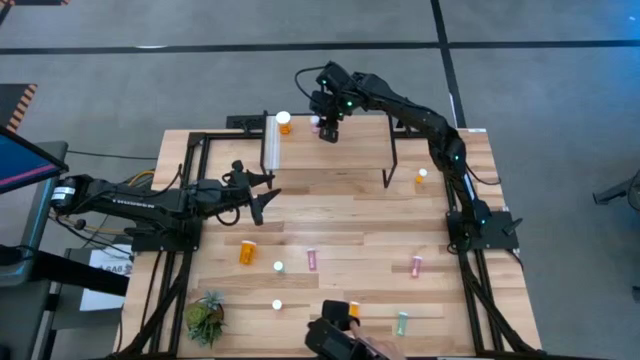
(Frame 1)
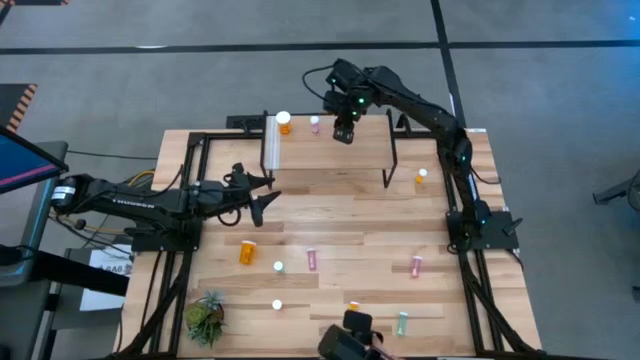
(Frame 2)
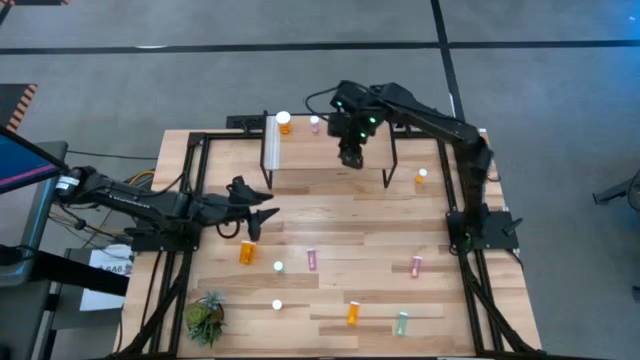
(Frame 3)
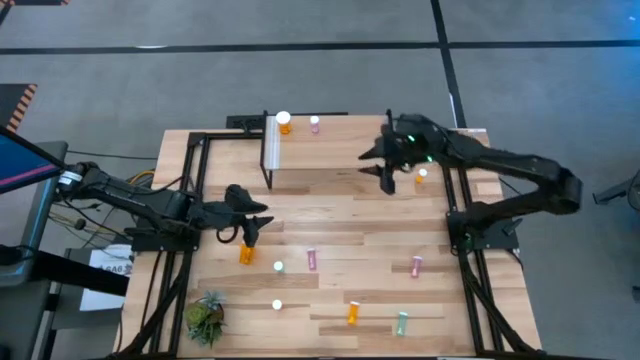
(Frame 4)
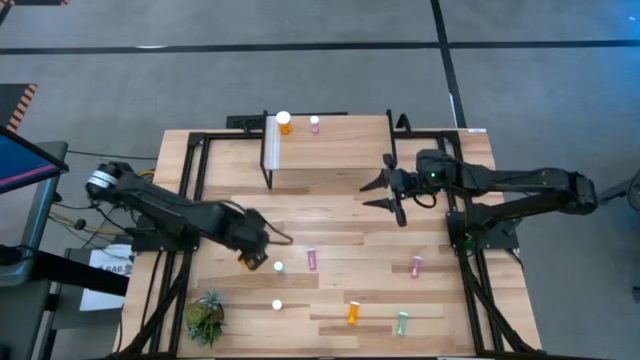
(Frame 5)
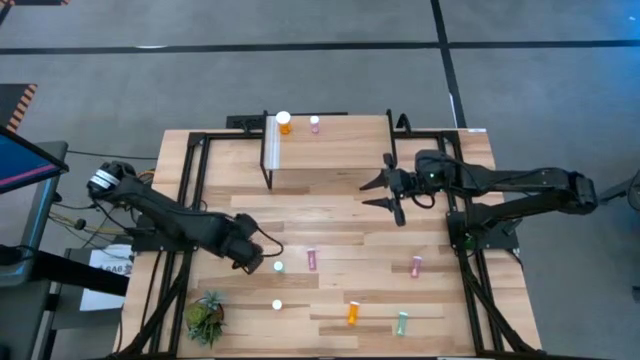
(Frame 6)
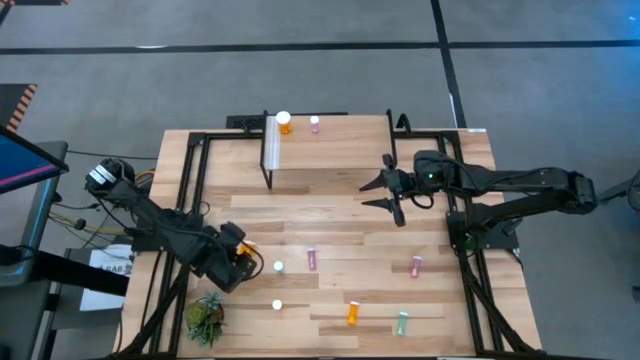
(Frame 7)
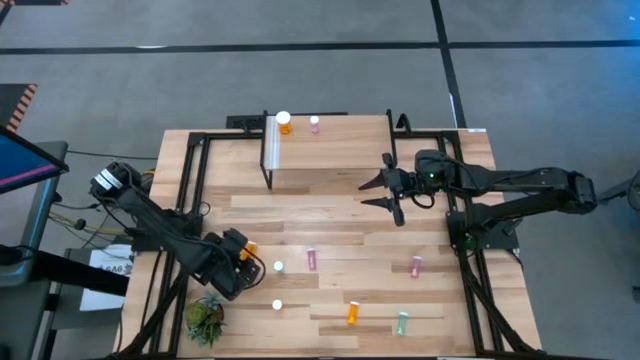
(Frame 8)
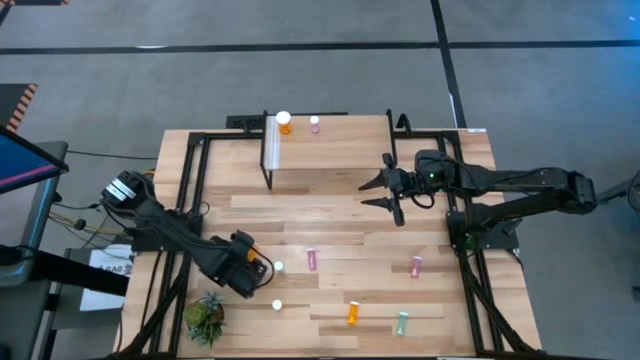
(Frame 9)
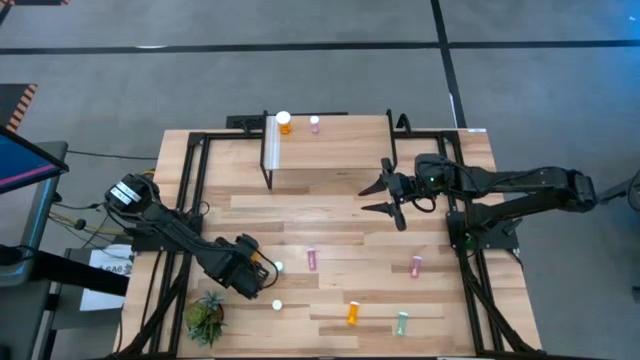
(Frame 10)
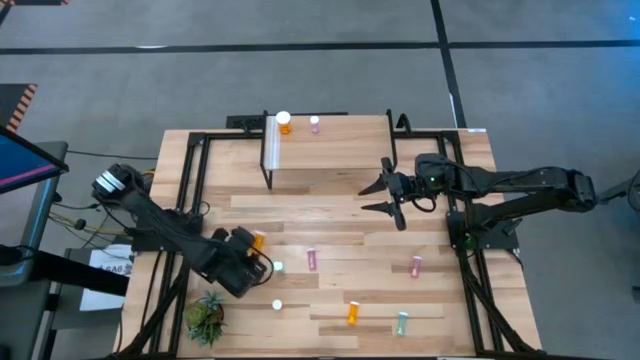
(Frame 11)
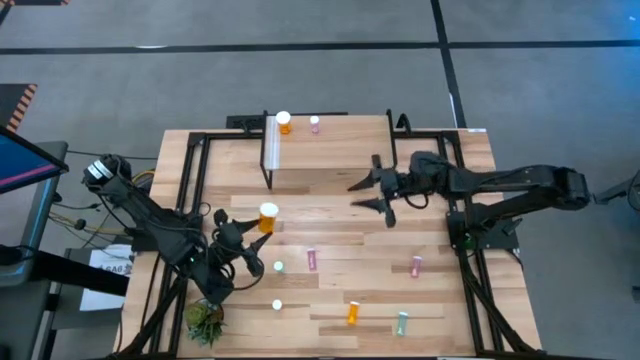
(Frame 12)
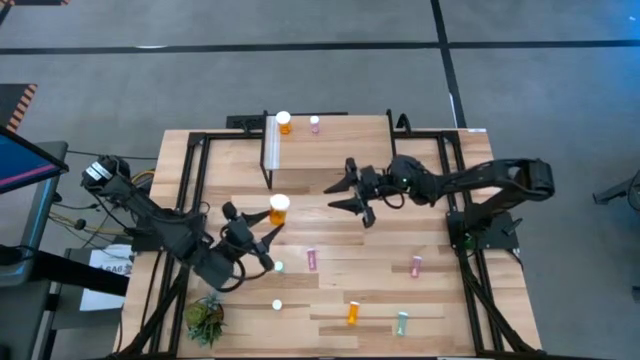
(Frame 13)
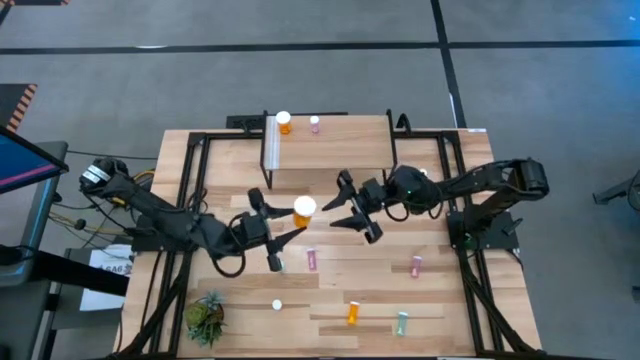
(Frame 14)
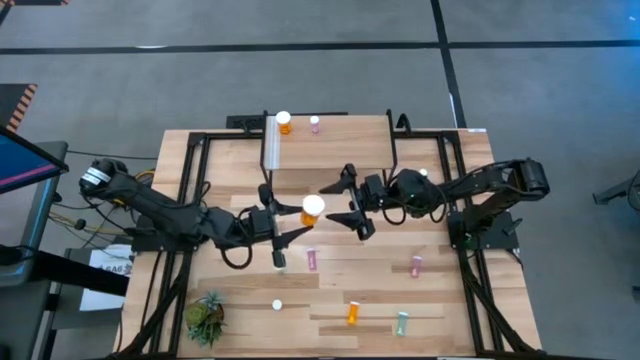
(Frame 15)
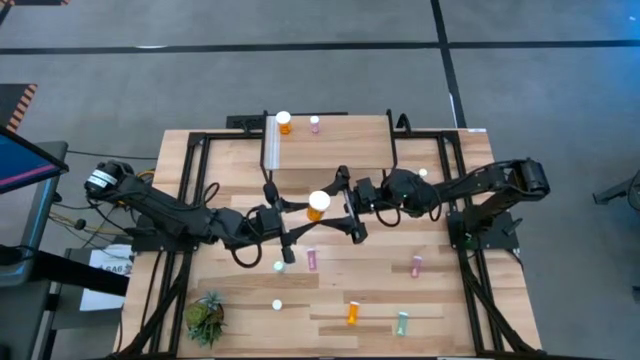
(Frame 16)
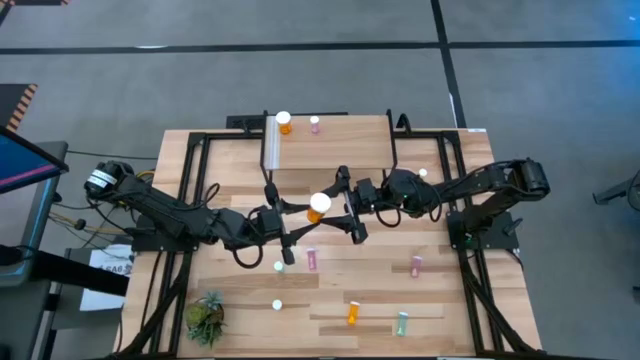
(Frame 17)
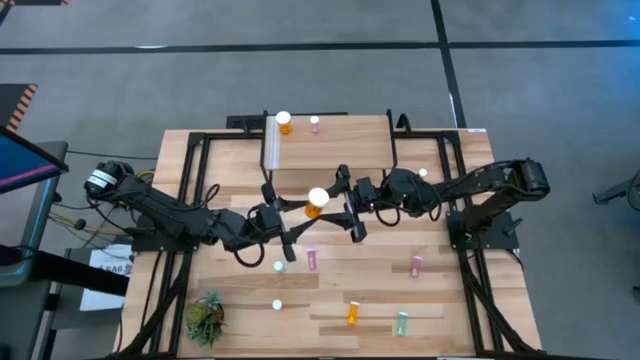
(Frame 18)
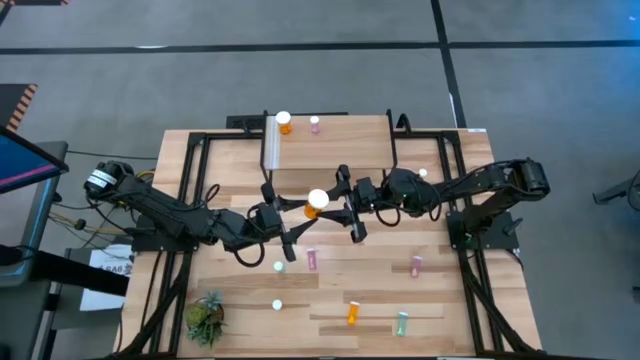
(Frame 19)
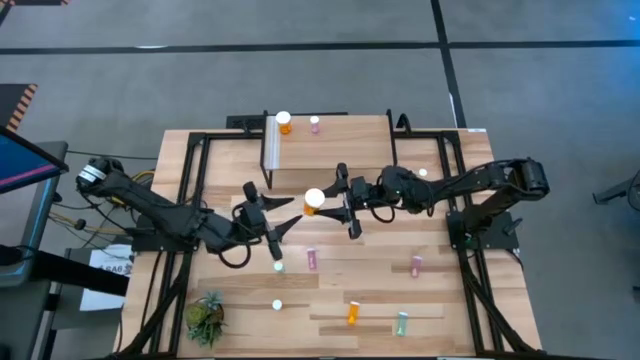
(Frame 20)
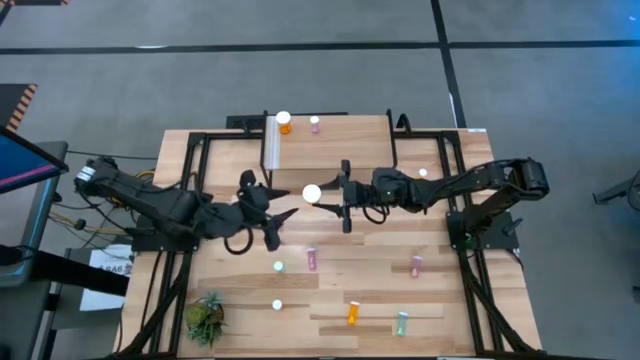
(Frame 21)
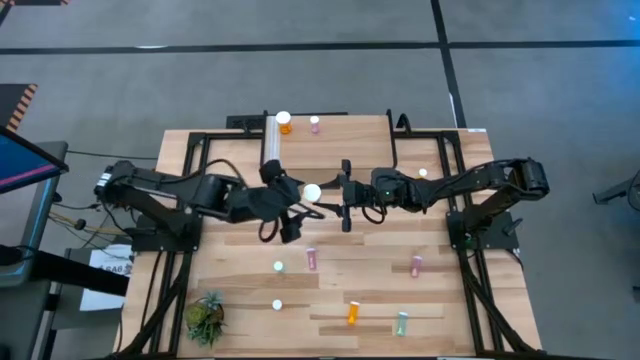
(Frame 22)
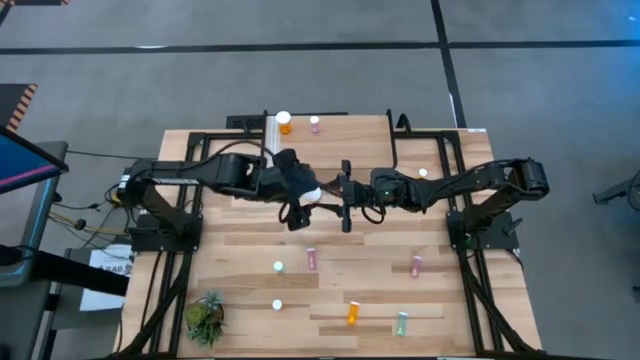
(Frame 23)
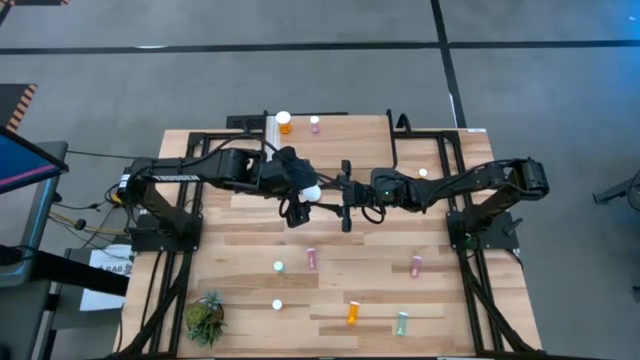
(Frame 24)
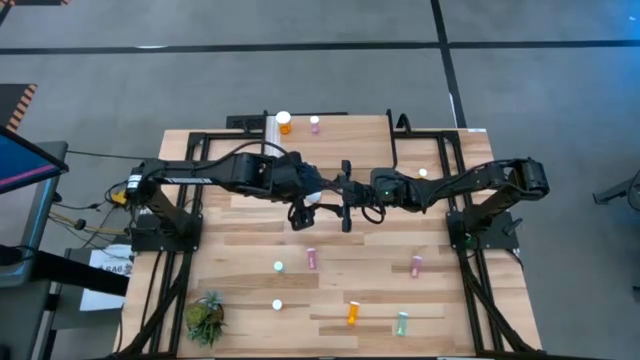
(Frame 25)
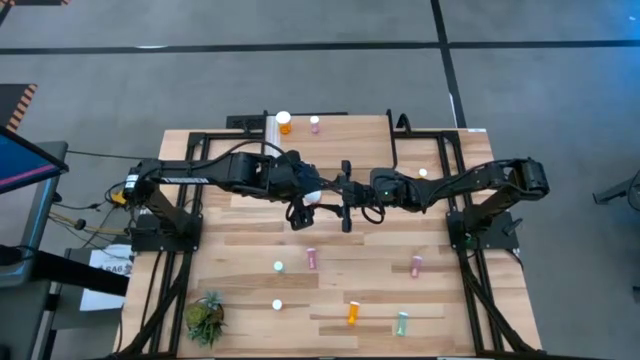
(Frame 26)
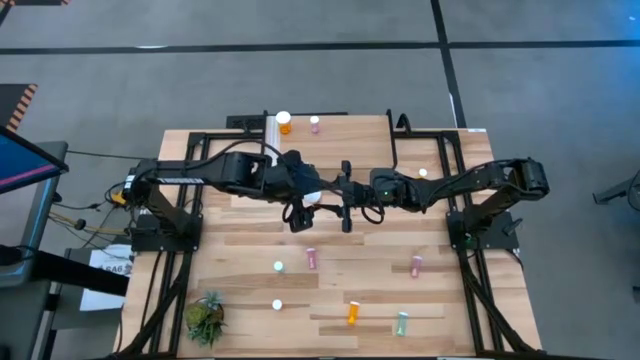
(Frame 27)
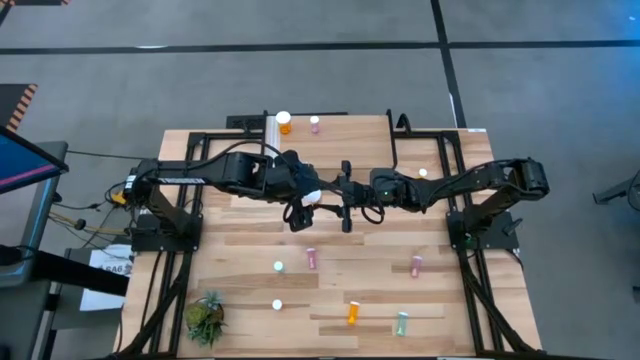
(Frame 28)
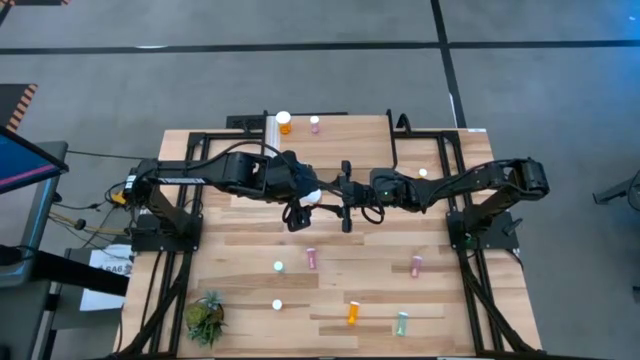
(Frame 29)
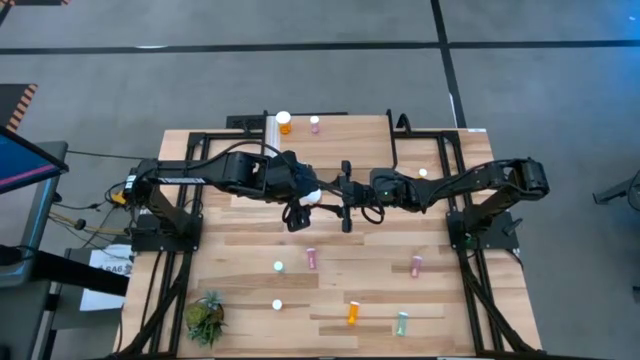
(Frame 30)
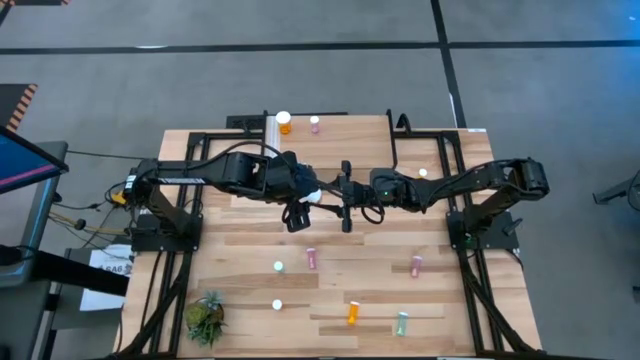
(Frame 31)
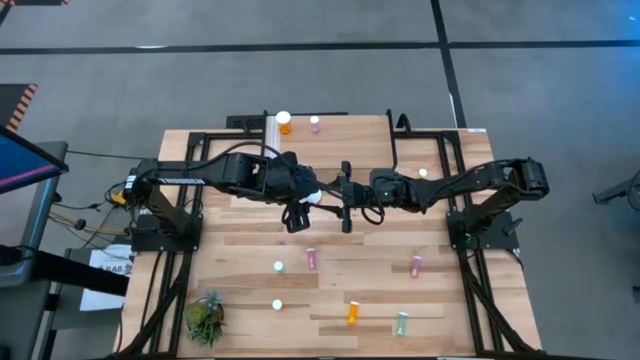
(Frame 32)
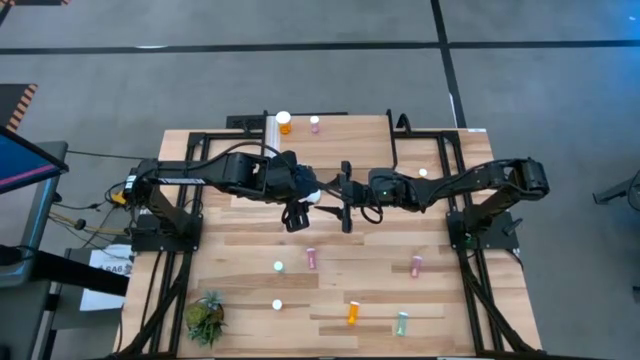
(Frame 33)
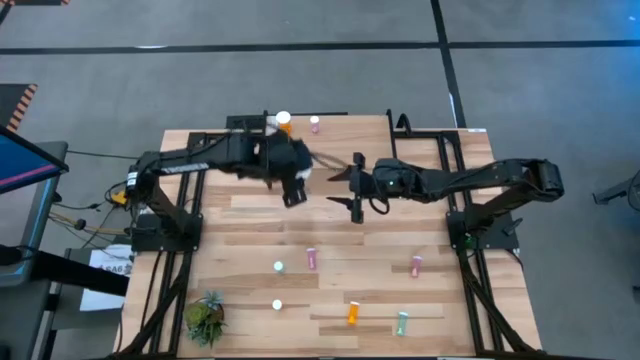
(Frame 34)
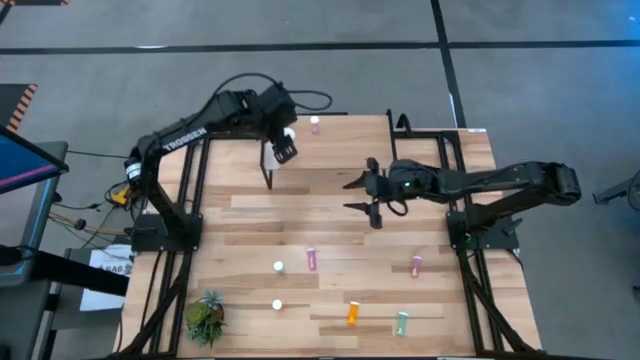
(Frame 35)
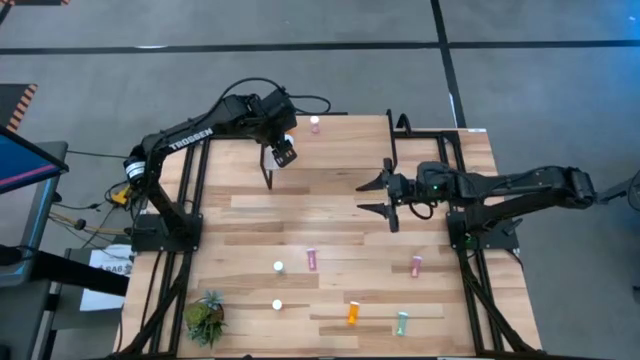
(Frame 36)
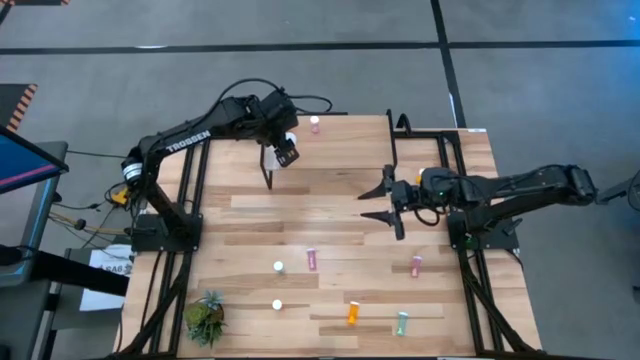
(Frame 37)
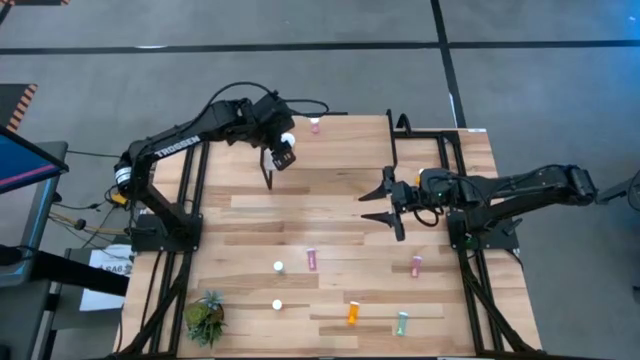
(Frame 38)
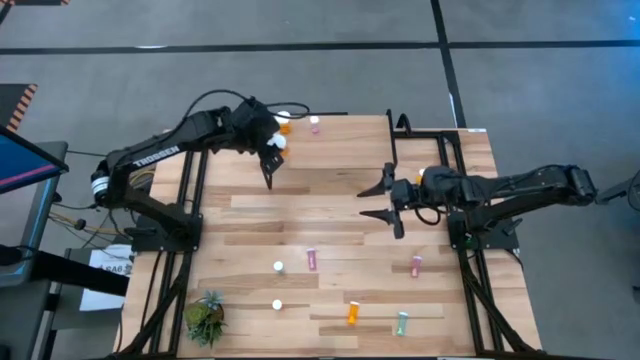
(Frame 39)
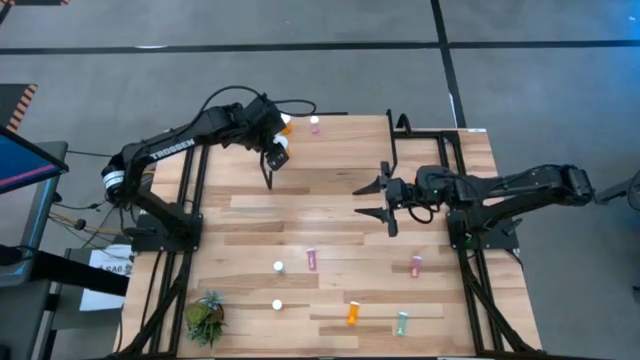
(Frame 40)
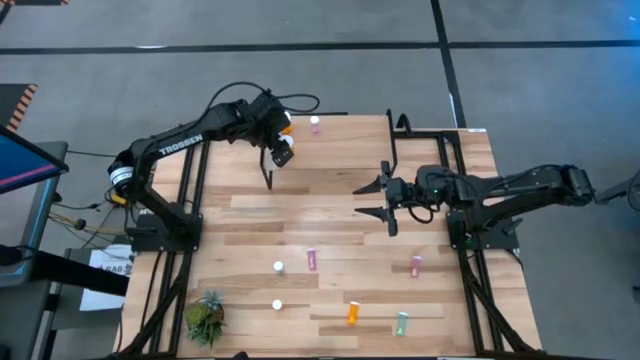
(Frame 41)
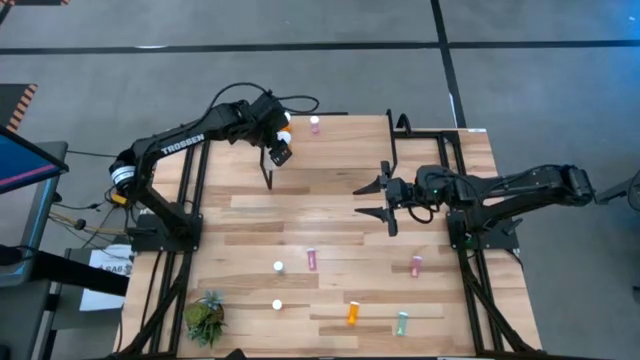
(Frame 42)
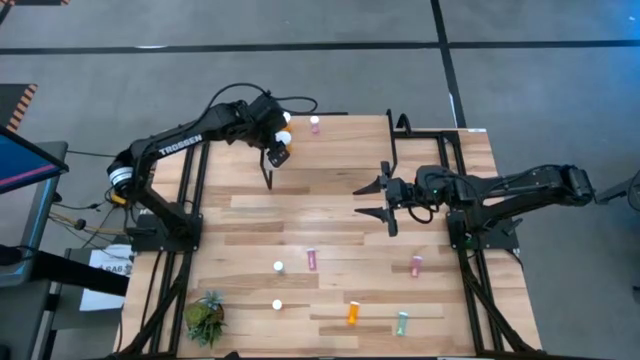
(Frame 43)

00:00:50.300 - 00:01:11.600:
Task: Pick and place medicine bottles onto shelf by color
Put the large orange pill bottle on the shelf align with the other large orange pill bottle
